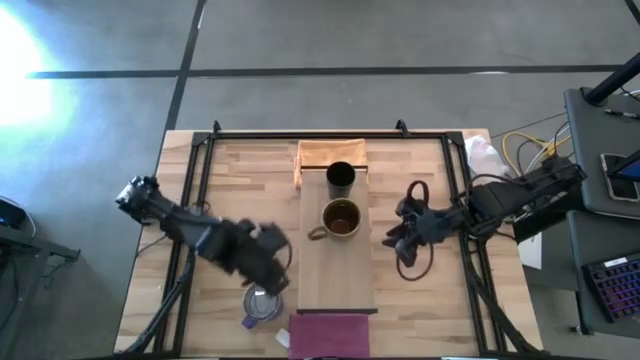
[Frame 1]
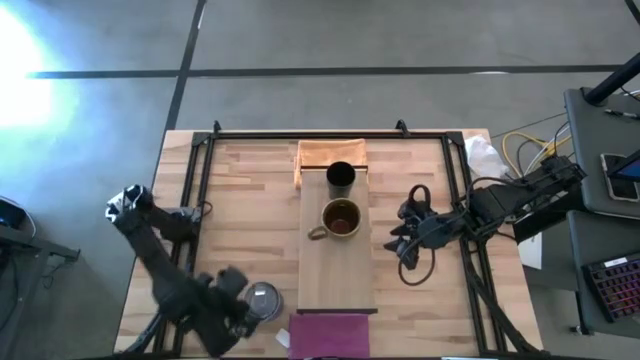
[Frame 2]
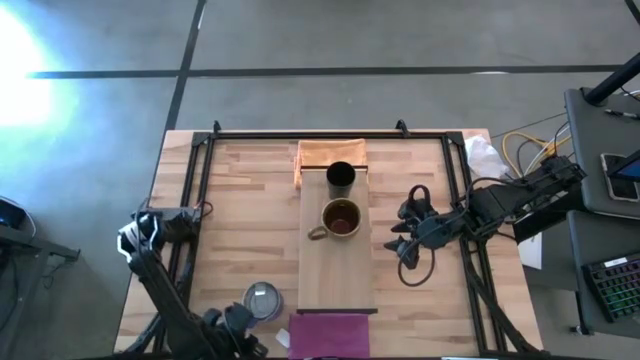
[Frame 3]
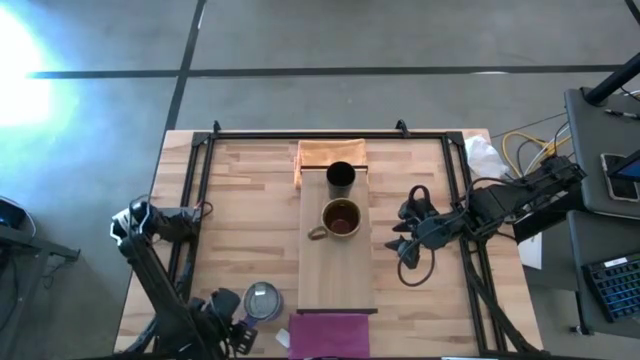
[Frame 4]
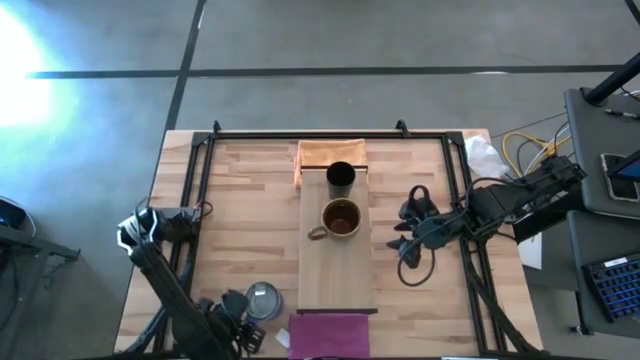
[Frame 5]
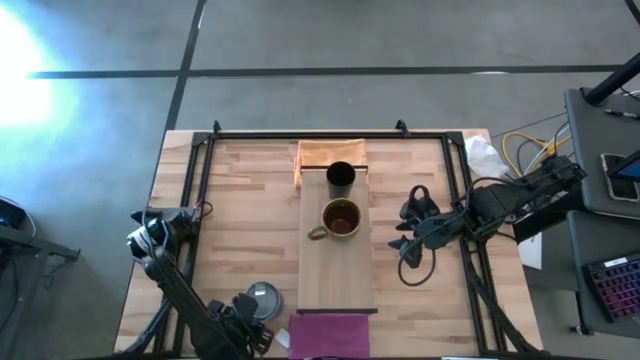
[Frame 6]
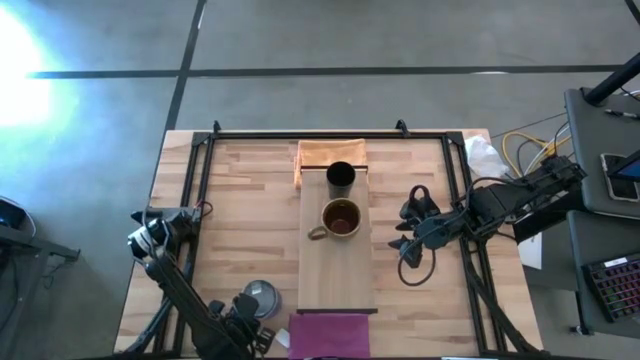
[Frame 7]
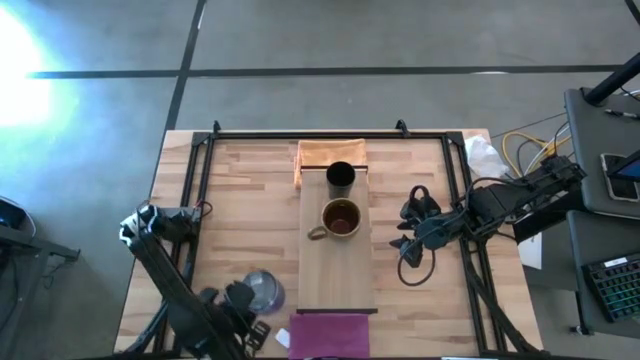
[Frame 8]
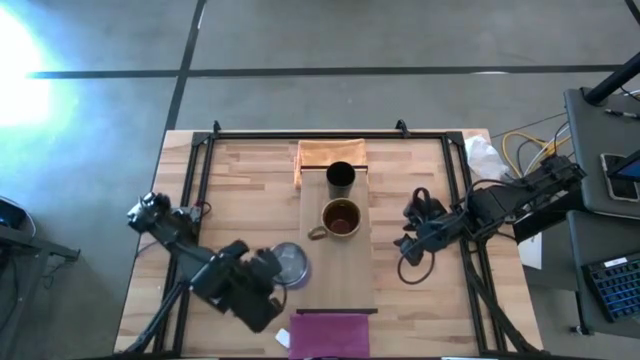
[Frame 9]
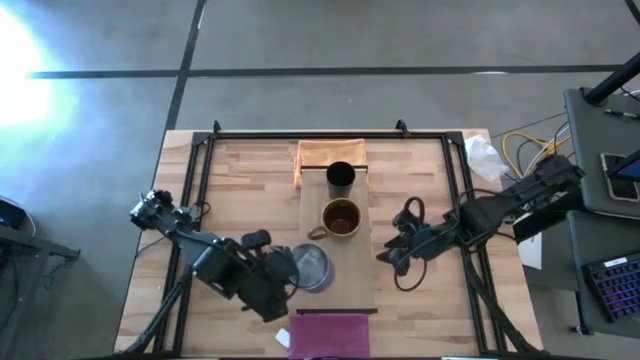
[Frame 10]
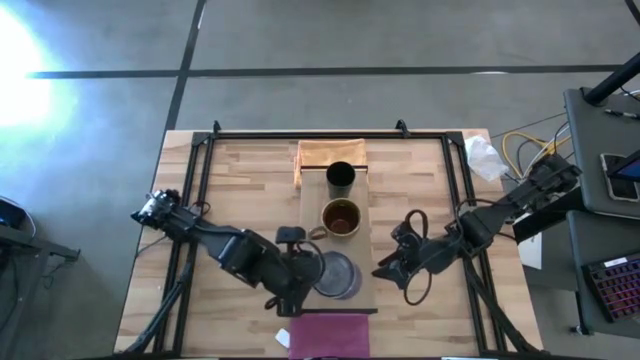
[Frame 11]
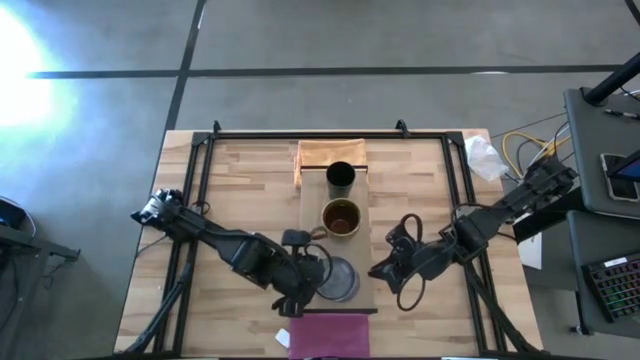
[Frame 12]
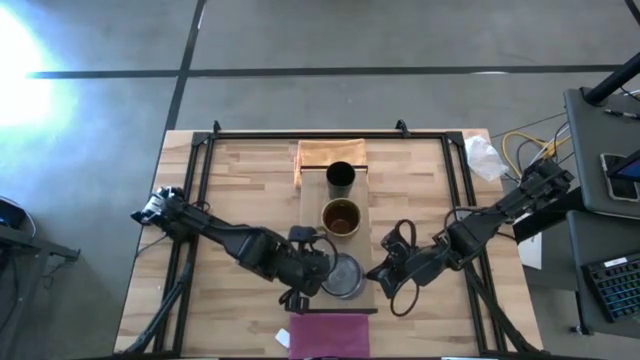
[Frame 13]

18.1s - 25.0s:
Task: Stack small to large cups/mugs on shelf
Put the purple mug on the shelf

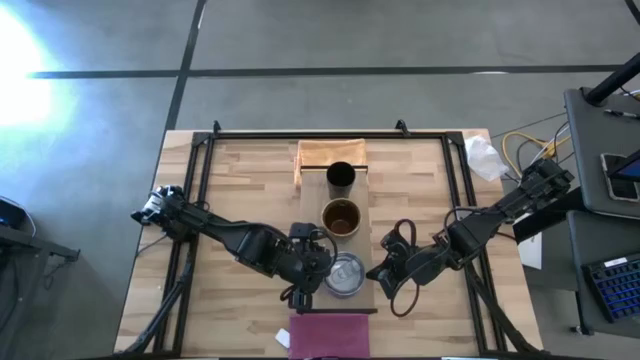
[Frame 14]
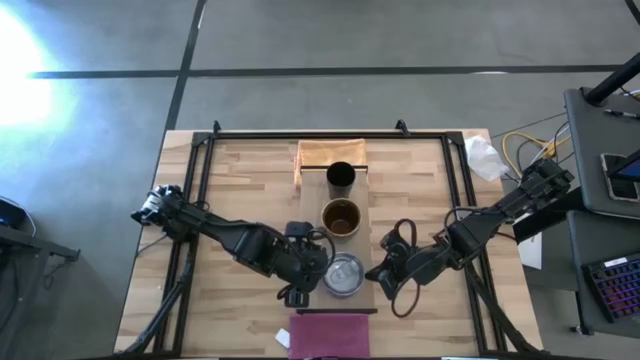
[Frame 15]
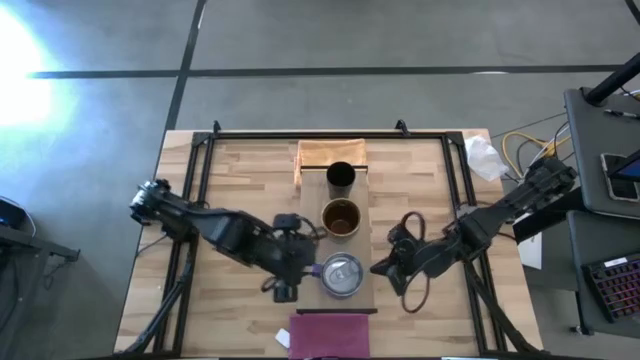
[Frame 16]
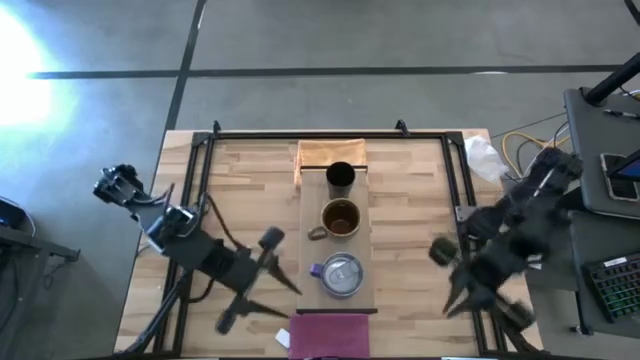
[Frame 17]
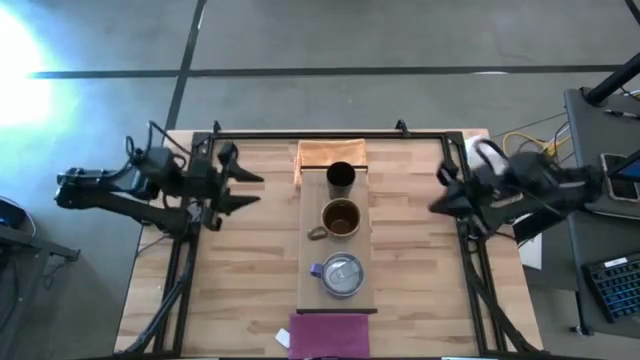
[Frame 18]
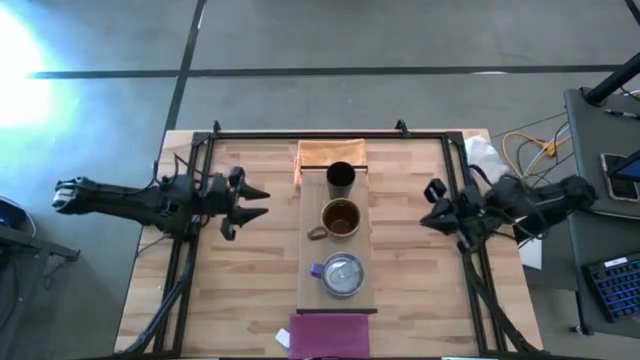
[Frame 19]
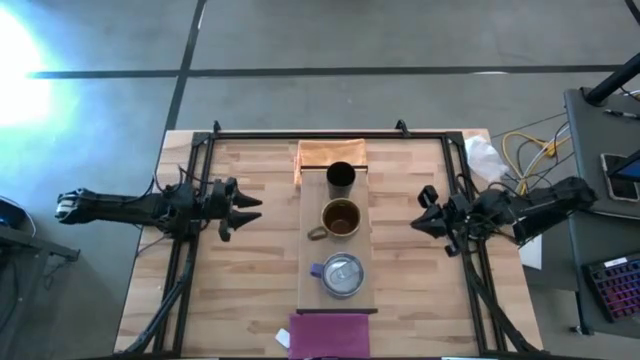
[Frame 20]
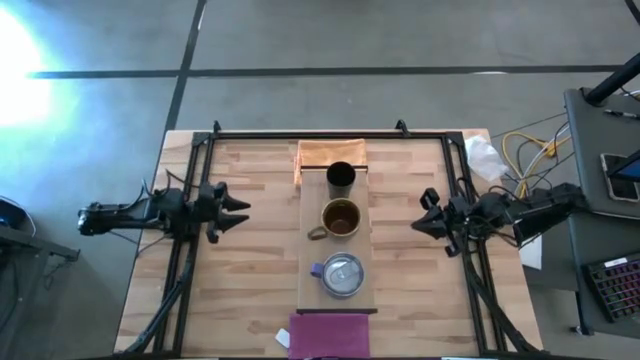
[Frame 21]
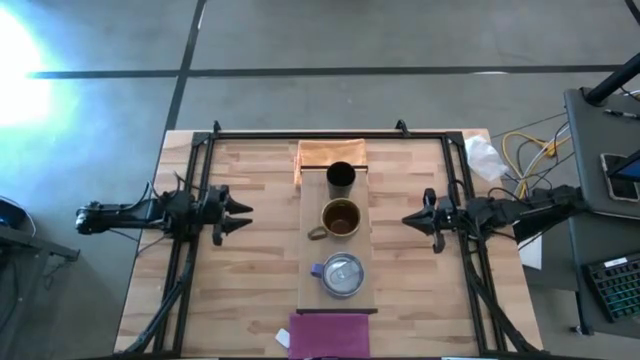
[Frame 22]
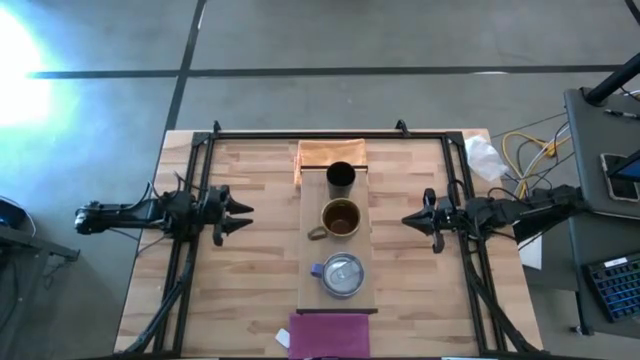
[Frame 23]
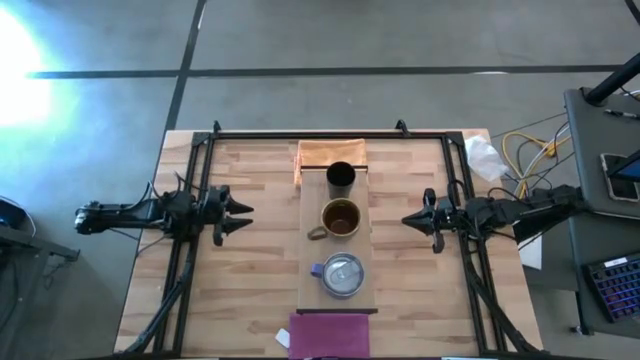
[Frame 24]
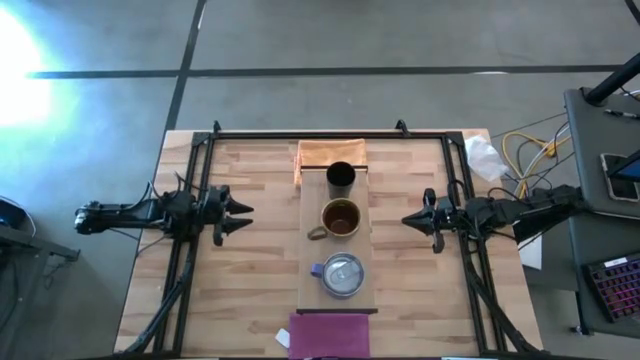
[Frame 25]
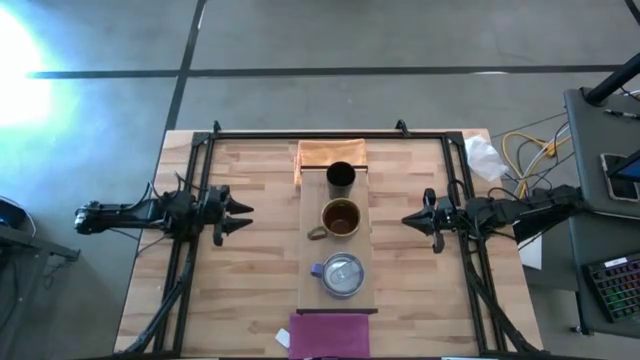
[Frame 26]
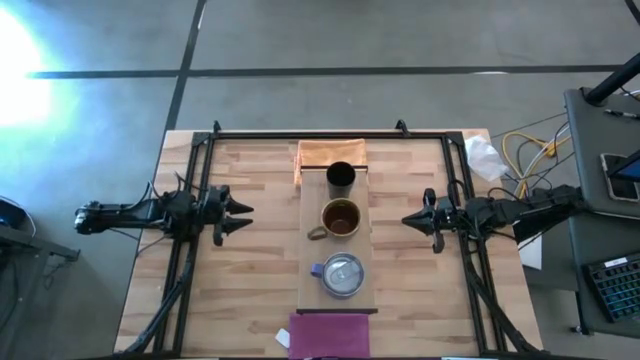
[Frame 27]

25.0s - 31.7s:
Return to Home Position

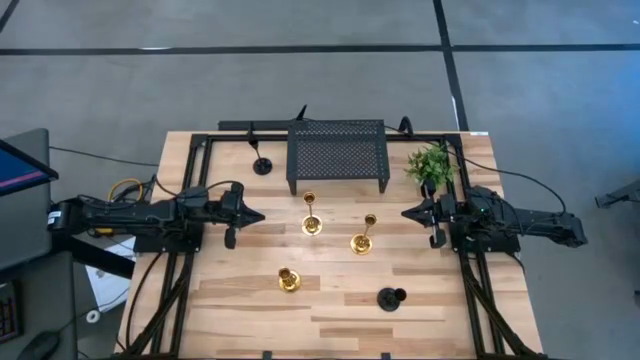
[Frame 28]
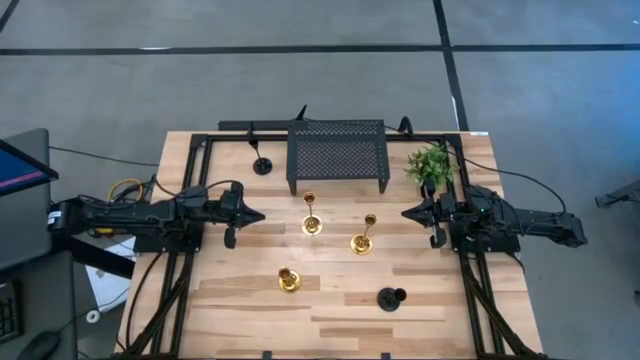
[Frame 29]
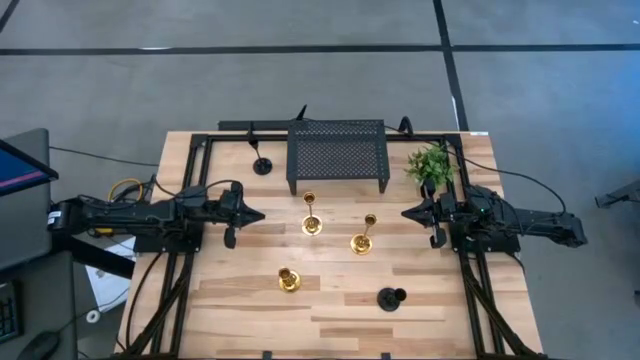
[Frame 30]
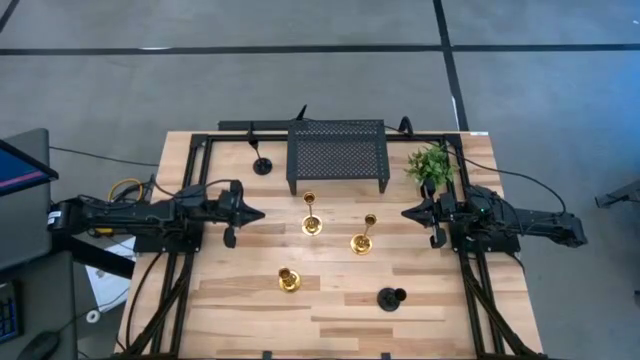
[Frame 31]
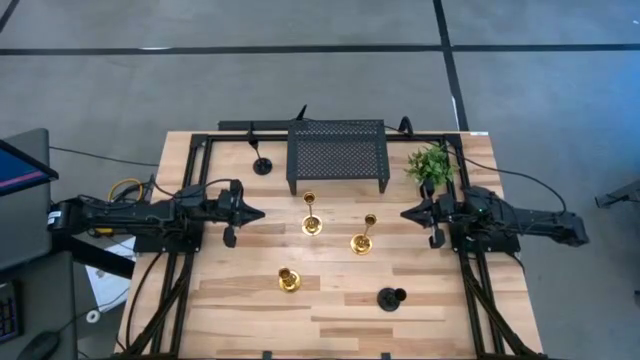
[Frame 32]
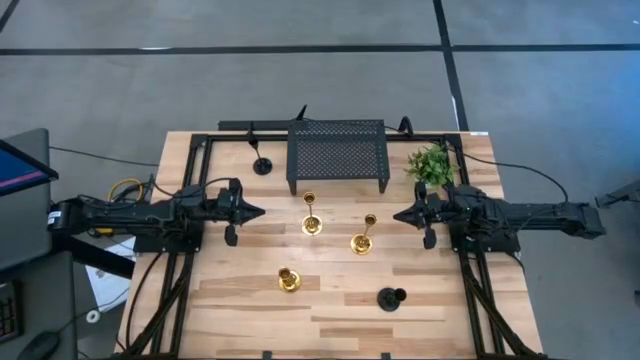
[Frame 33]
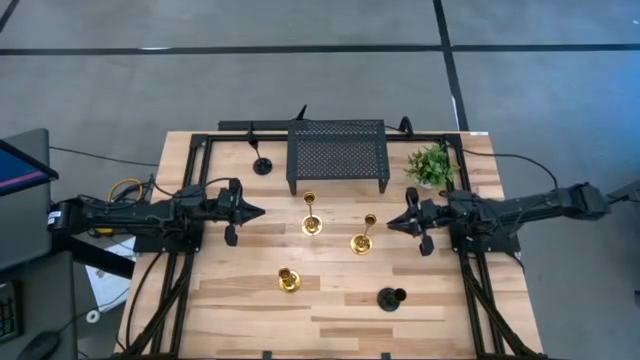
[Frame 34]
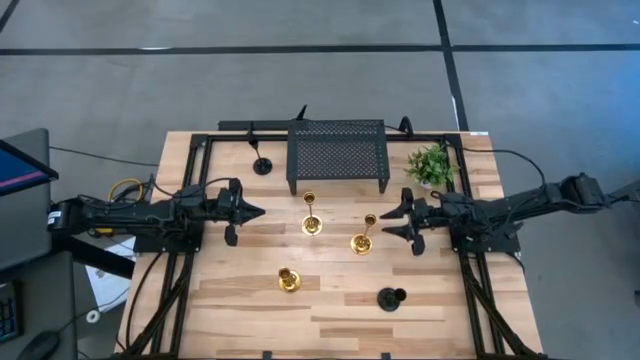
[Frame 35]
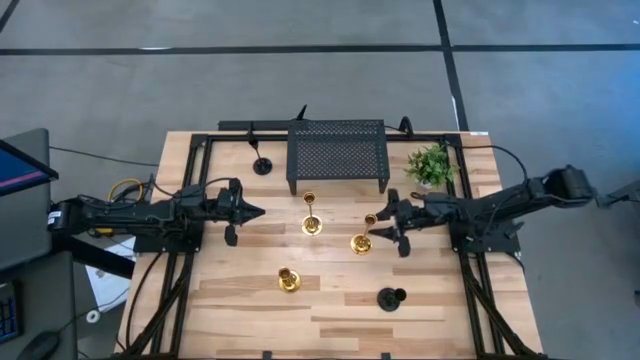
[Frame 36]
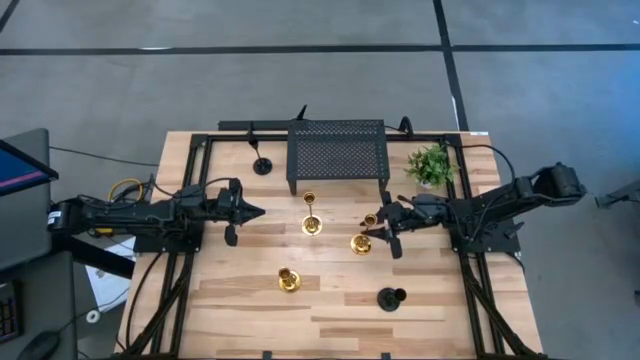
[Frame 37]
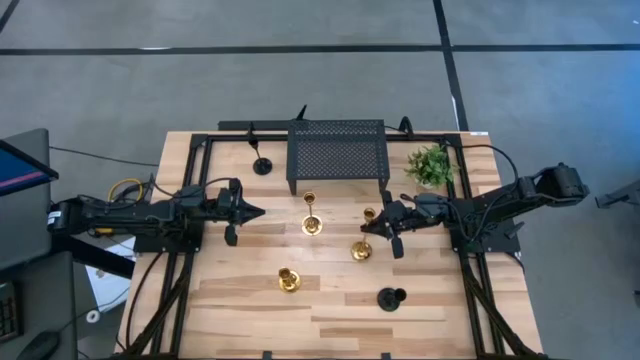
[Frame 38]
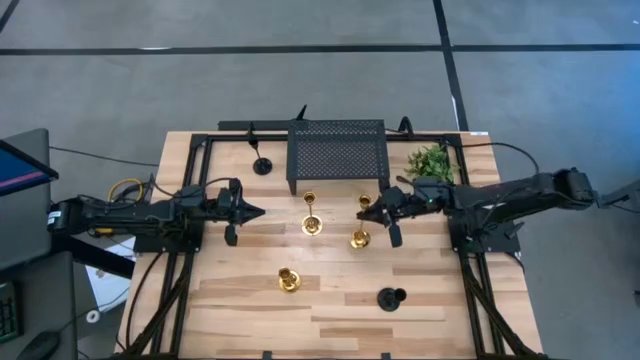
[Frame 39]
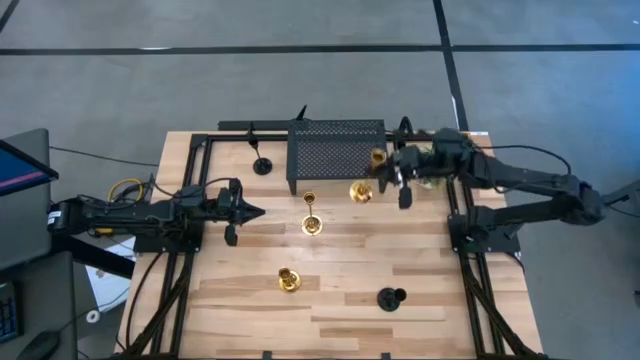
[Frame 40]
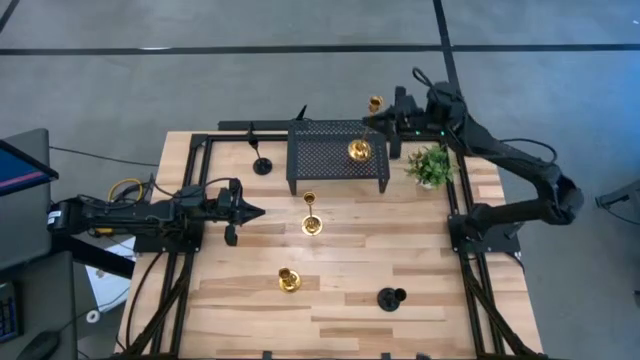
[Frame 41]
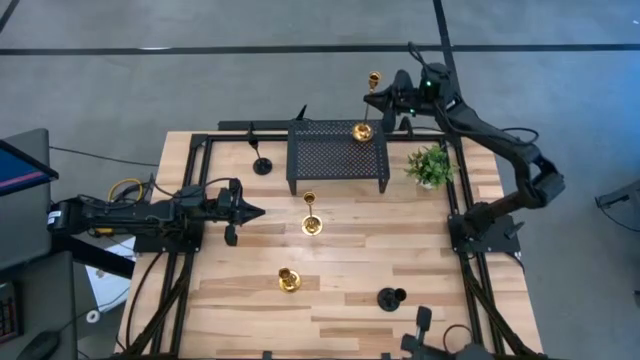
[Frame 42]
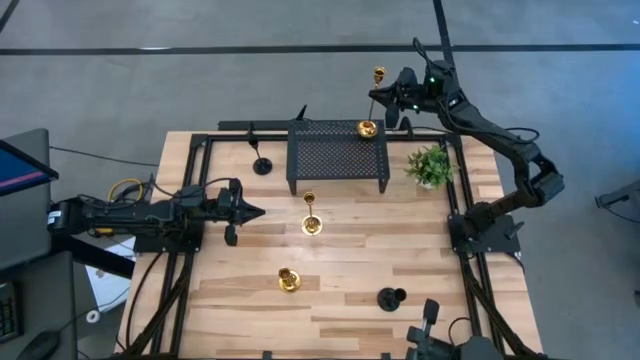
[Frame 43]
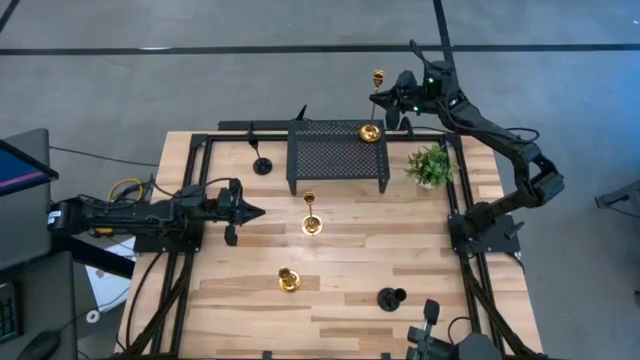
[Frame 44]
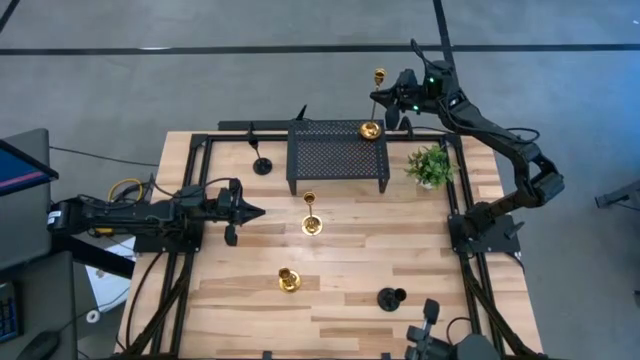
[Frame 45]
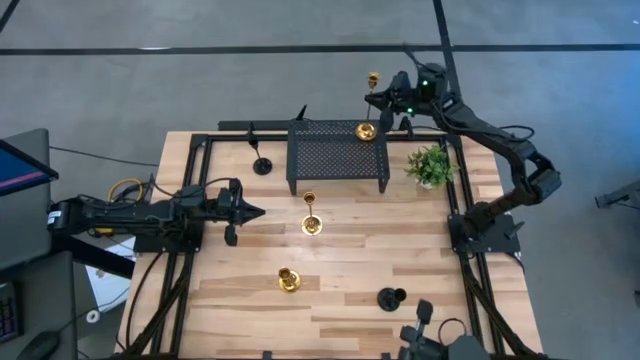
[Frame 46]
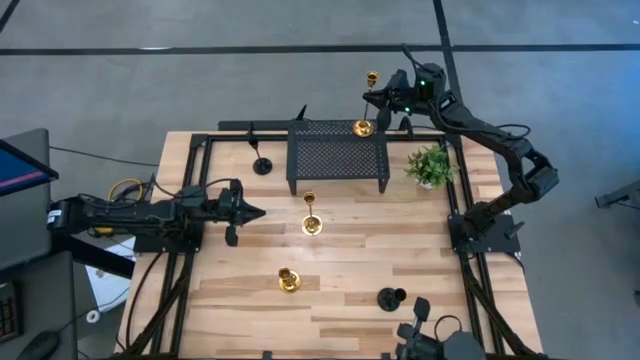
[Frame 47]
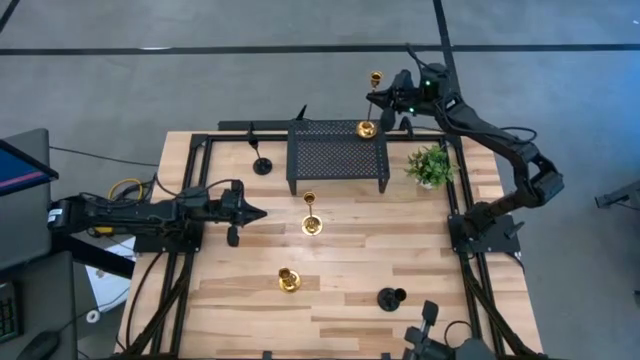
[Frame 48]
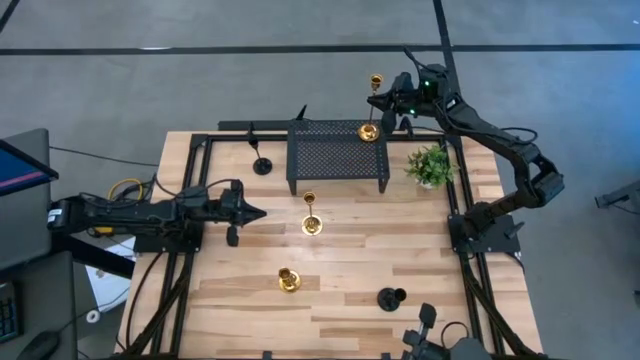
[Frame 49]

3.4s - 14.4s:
Task: Pick & Place candle stick holders
Put the middle right gold candle holder on the shelf
